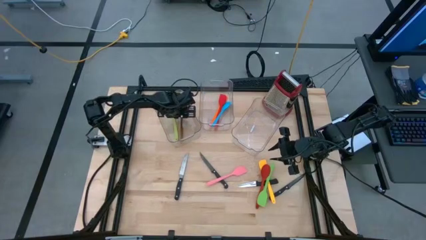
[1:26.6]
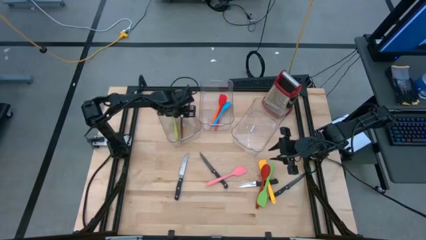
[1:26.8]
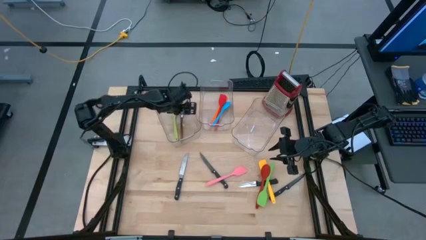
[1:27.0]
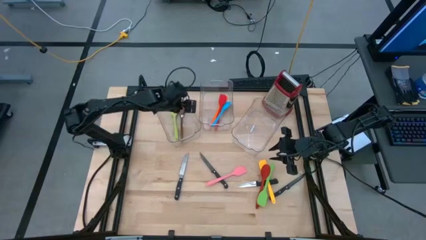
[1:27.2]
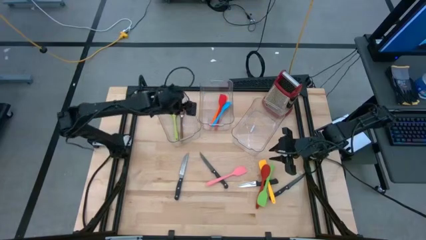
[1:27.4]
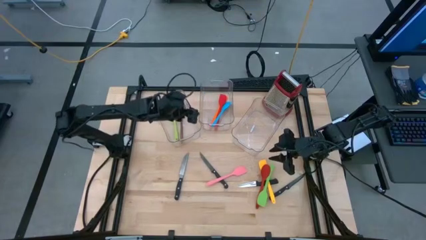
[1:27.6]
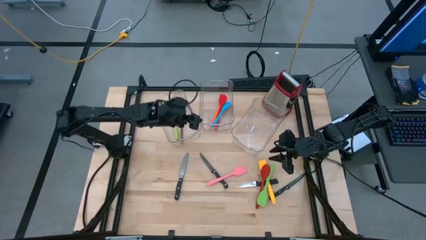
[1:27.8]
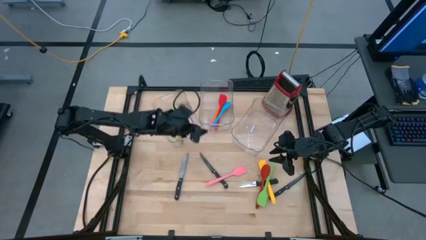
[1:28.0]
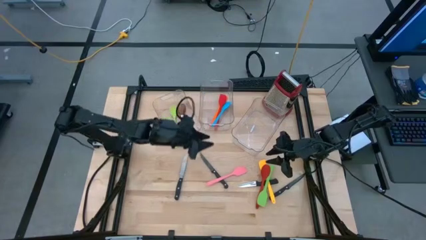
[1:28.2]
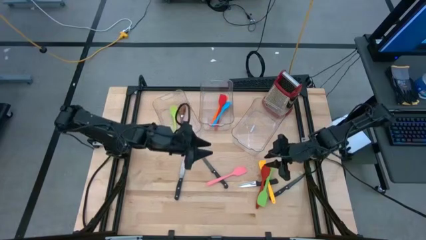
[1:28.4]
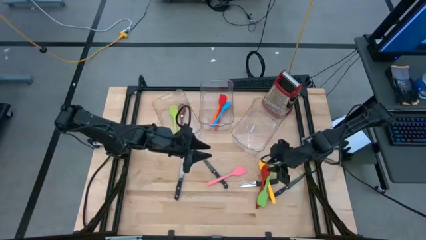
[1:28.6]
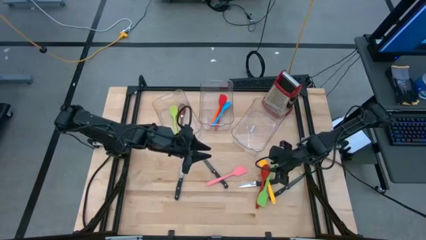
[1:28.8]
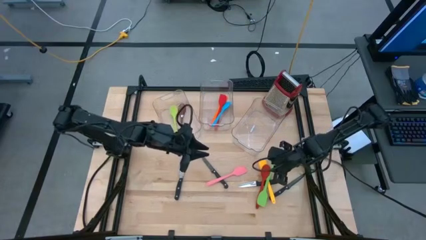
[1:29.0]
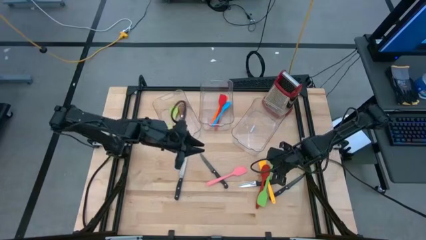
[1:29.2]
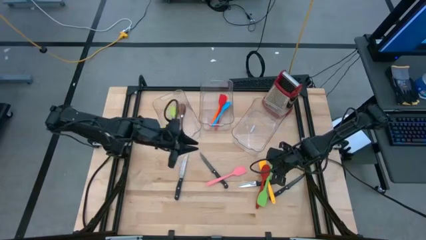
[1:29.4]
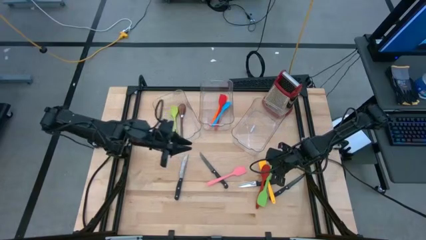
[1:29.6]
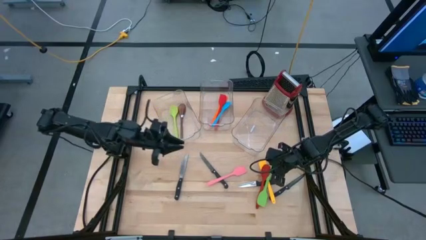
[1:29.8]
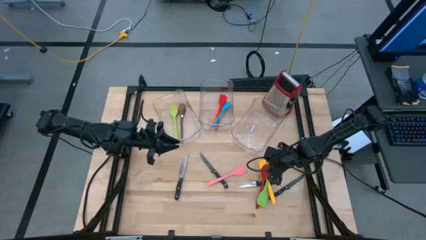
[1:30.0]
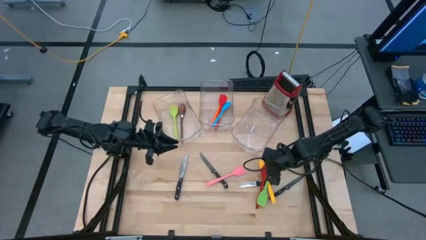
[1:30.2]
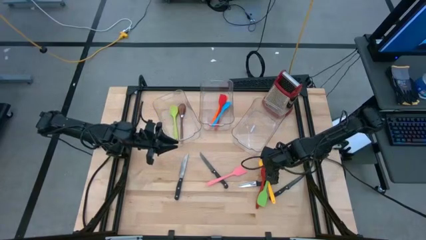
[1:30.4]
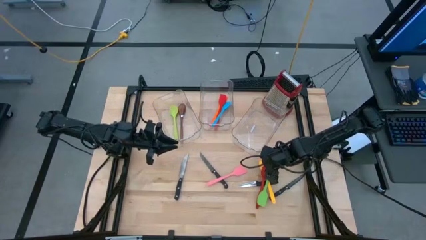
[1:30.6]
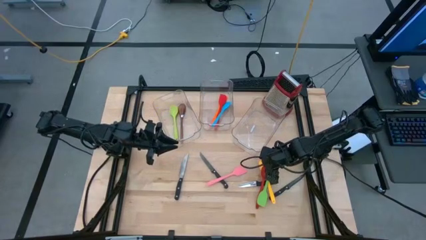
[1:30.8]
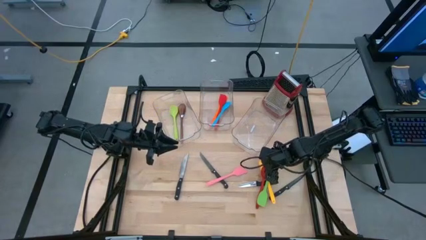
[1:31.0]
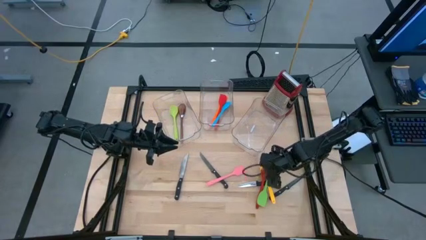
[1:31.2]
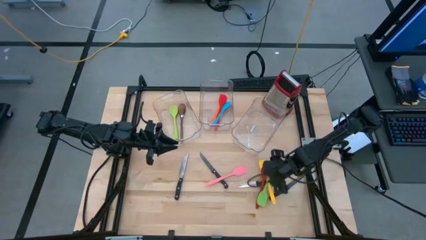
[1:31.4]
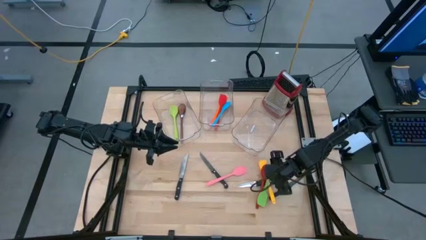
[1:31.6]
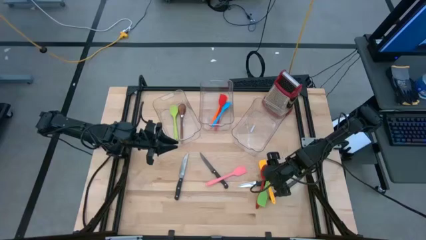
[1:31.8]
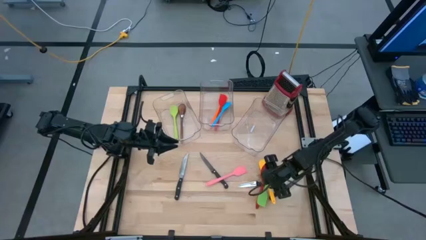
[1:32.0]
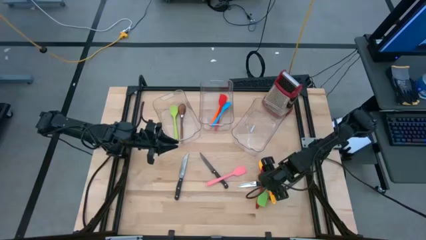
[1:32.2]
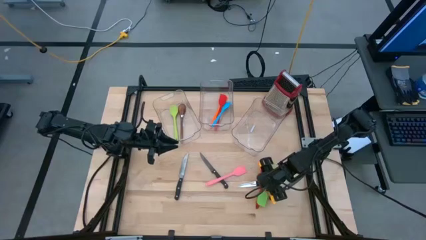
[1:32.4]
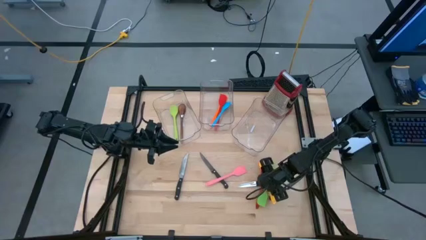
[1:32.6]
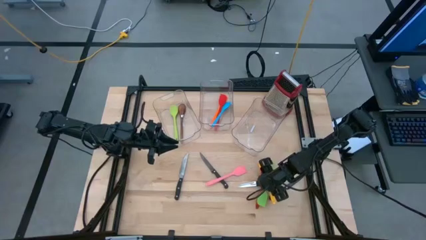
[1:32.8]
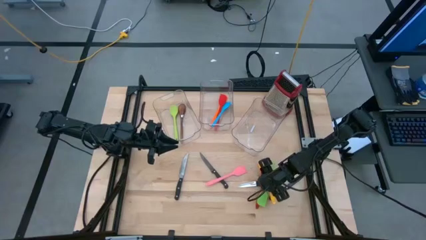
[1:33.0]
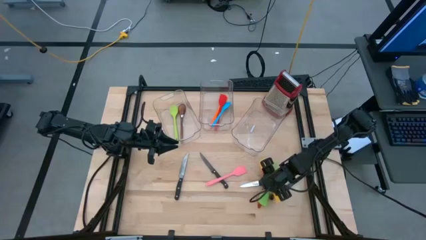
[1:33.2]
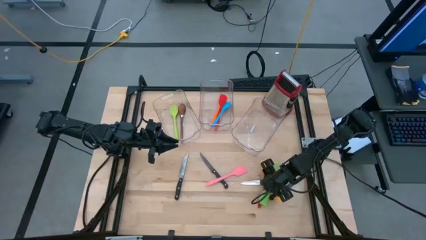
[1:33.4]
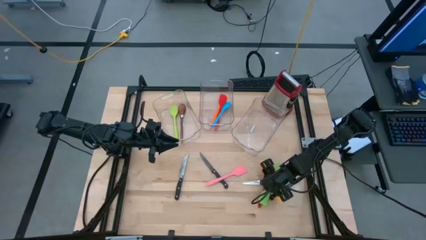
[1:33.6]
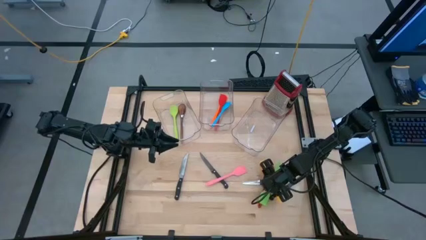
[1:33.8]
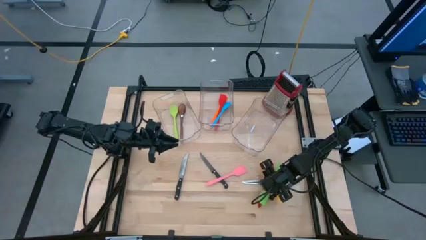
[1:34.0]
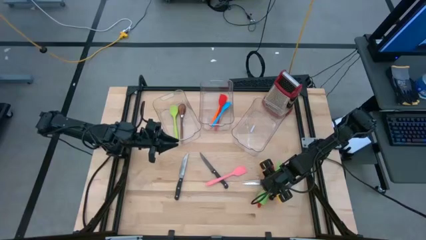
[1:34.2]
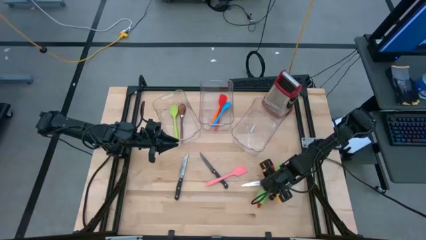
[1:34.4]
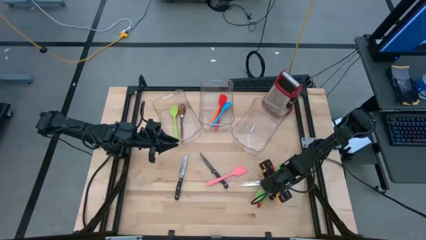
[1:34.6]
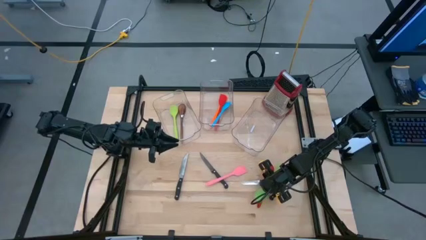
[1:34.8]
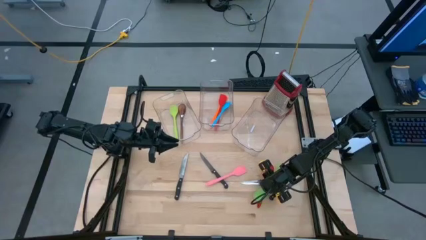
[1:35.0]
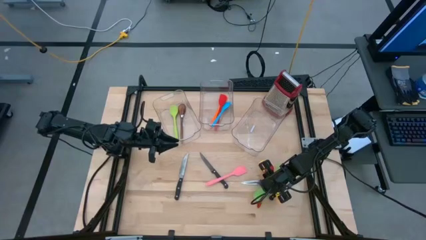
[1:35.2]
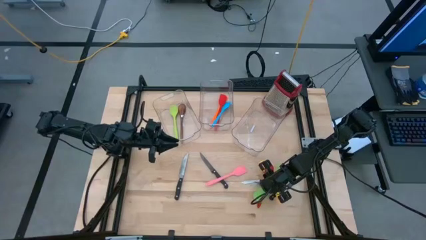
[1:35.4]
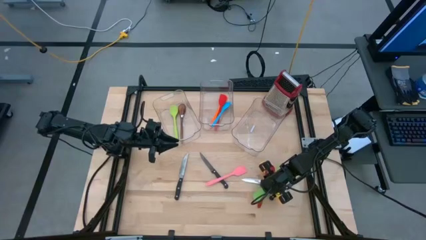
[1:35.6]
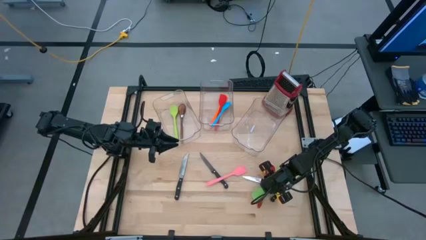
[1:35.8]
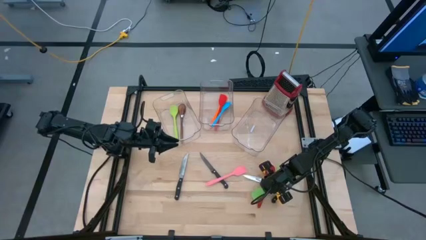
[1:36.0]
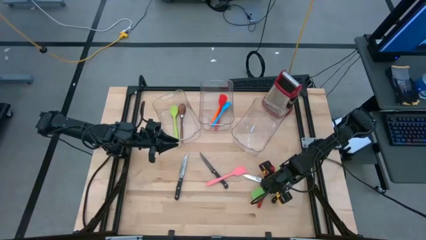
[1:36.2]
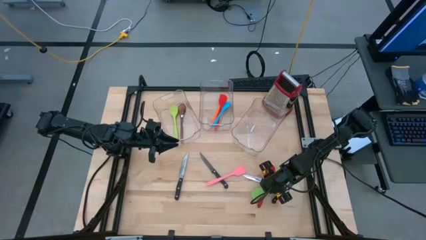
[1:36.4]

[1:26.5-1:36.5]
Task: Pick & Place Kitchen Items
Put the green spatula in the middle bin

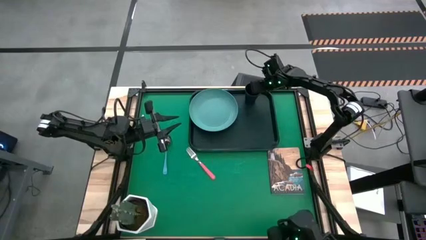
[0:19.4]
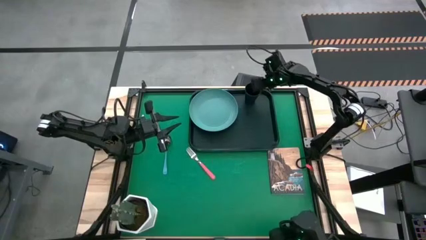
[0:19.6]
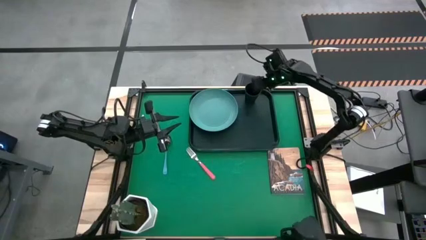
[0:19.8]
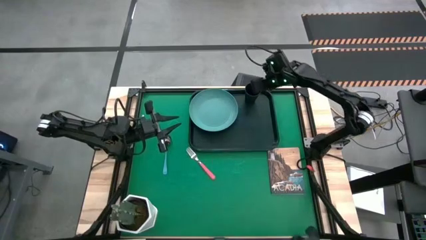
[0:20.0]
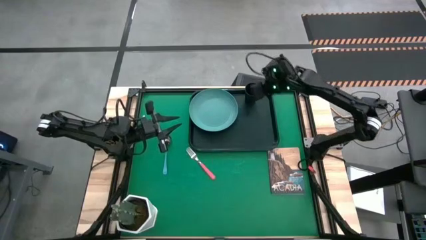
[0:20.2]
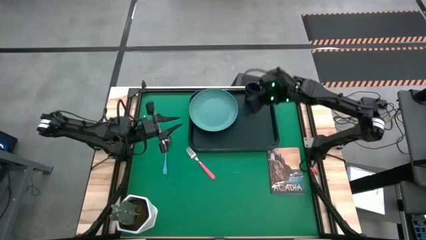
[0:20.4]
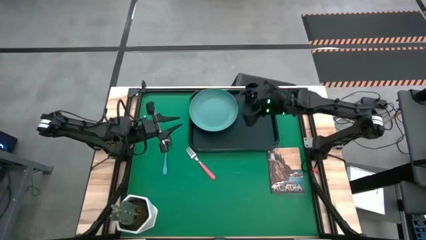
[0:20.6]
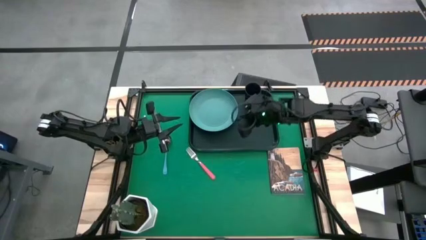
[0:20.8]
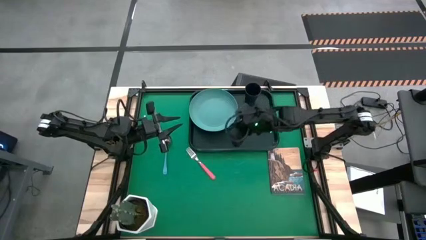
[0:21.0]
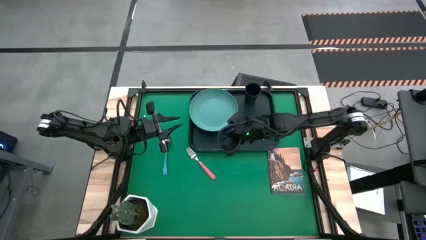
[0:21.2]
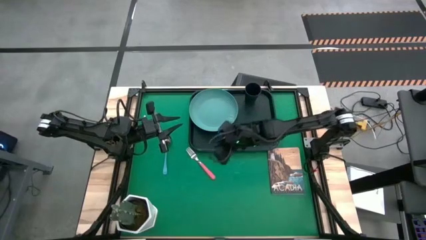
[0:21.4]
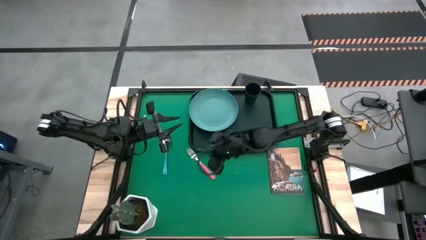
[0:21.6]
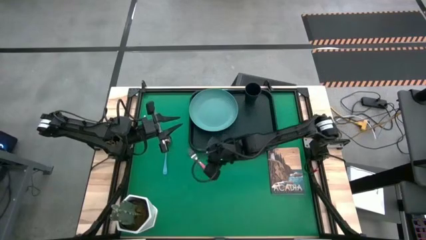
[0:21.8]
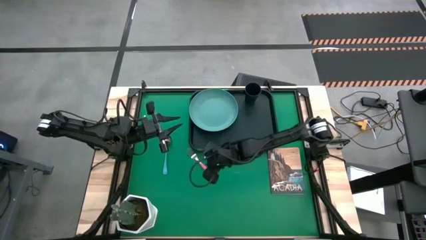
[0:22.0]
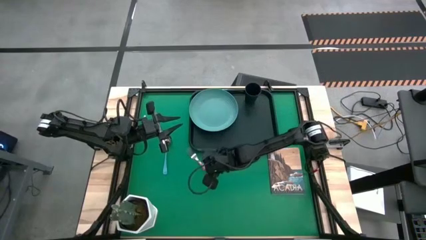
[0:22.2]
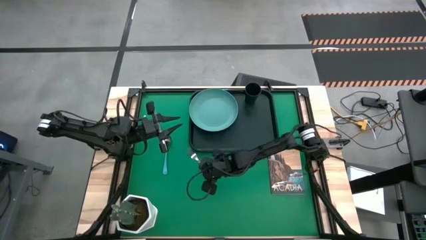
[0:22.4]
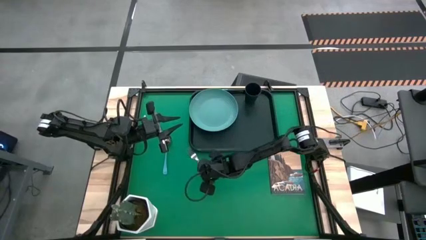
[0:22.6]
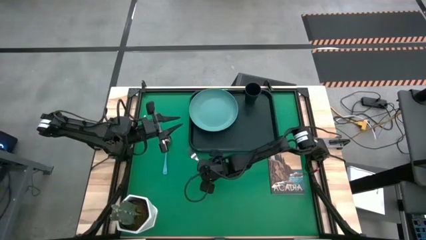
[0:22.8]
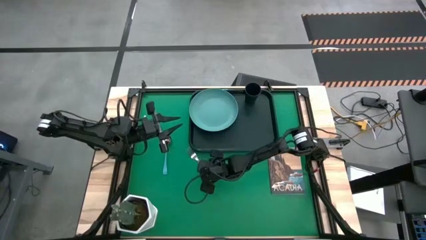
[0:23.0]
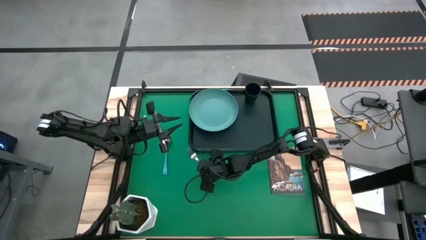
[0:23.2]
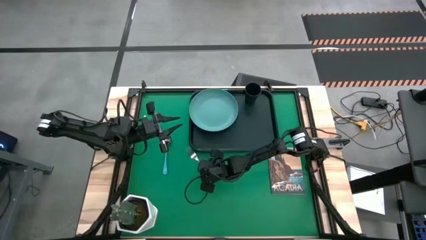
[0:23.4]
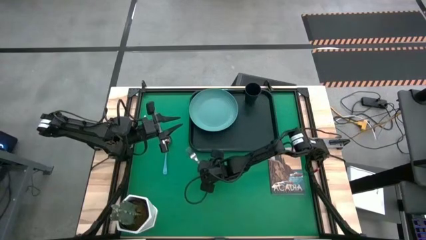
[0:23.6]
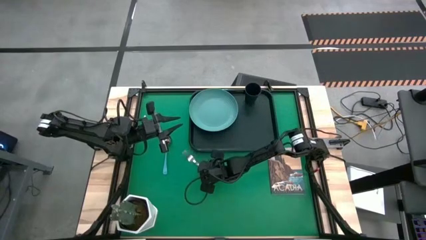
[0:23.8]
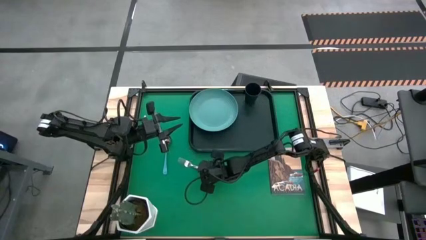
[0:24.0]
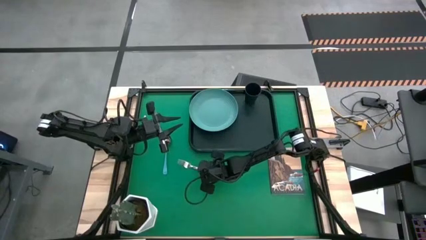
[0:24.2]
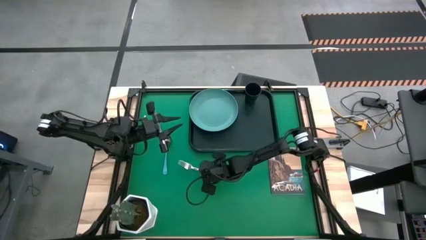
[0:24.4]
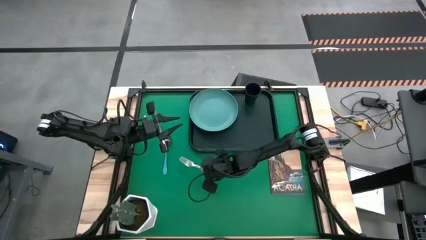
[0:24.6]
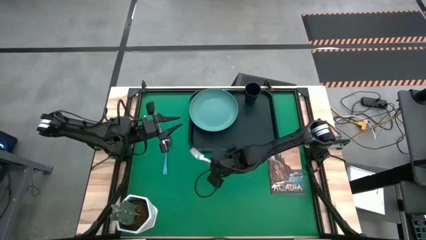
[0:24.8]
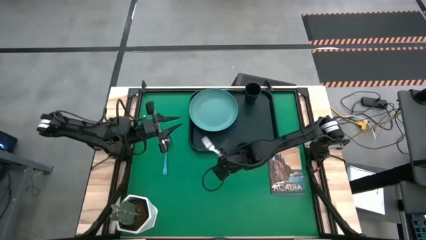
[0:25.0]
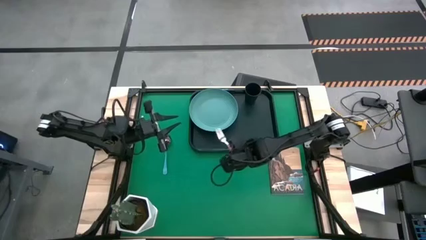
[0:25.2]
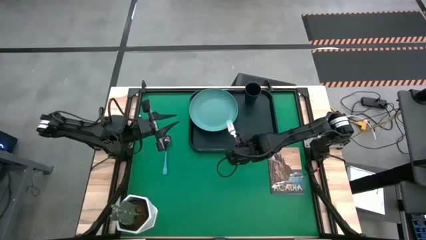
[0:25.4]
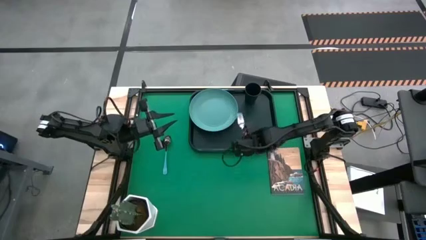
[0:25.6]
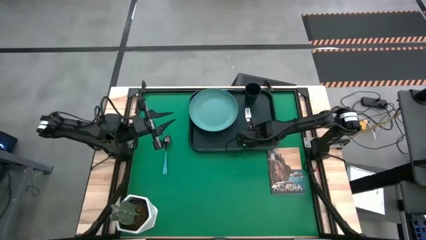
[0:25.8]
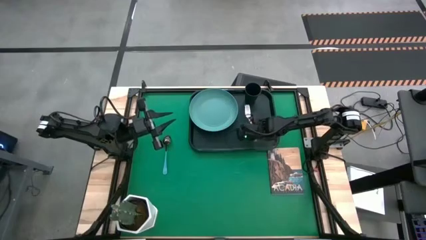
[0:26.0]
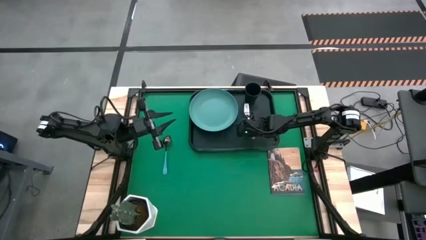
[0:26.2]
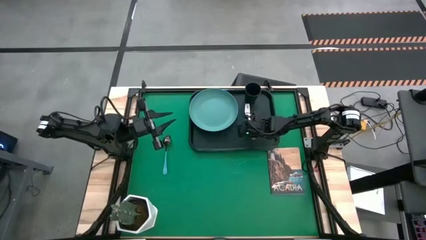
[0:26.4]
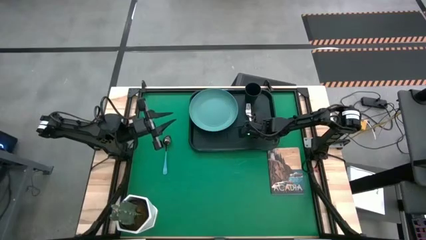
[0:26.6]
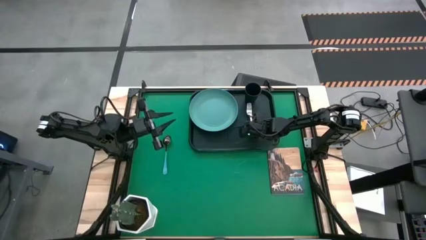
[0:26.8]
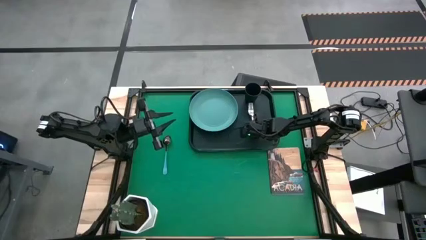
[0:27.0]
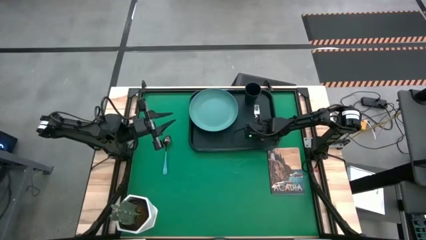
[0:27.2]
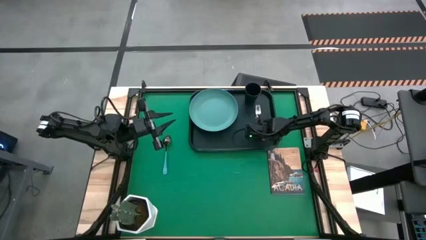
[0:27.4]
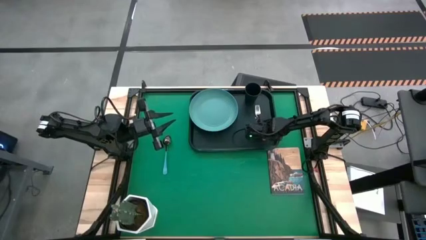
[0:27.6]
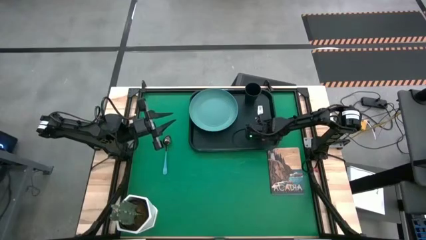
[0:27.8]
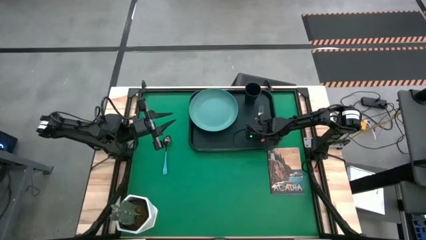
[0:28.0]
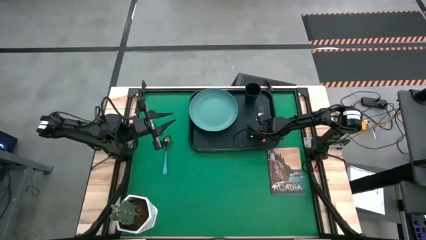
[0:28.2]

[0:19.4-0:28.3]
Task: Pick and place plate/cup/fork/spoon on tray
Put the pink fork on the black serving tray to the right of the green plate
